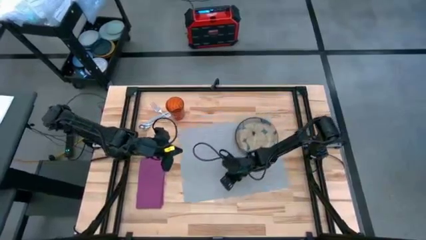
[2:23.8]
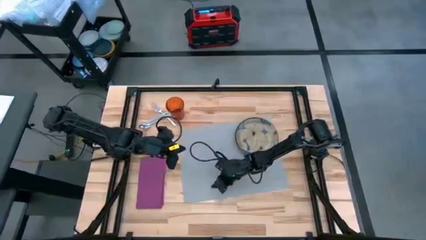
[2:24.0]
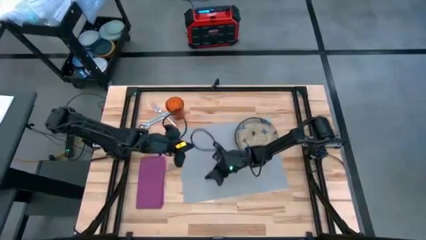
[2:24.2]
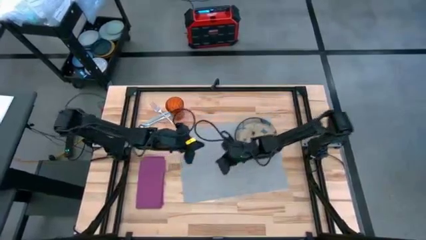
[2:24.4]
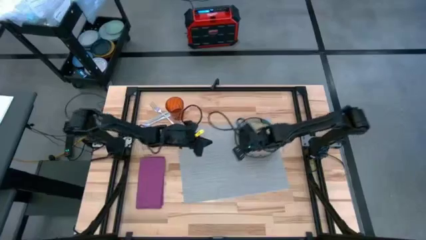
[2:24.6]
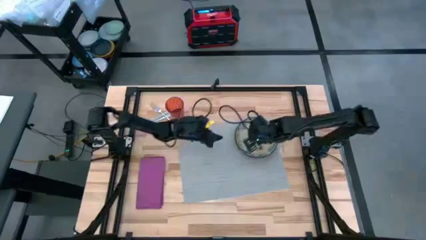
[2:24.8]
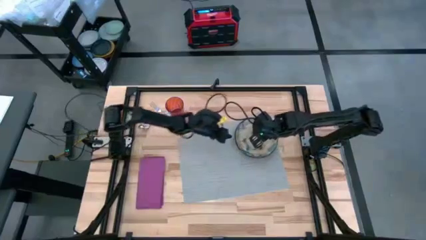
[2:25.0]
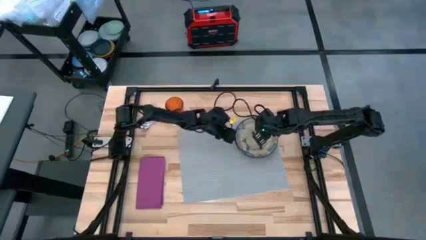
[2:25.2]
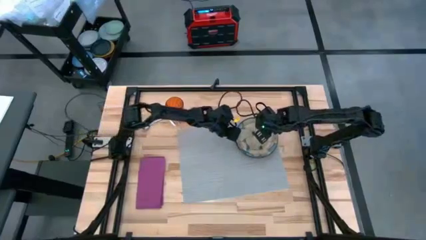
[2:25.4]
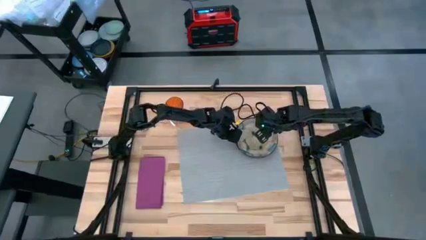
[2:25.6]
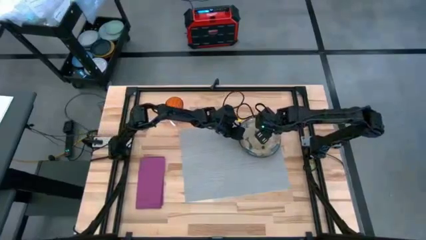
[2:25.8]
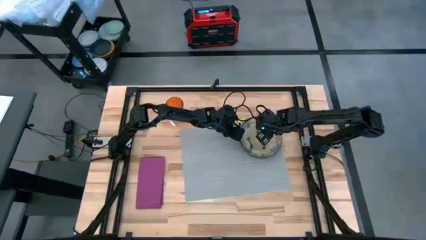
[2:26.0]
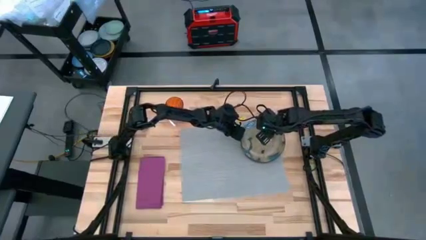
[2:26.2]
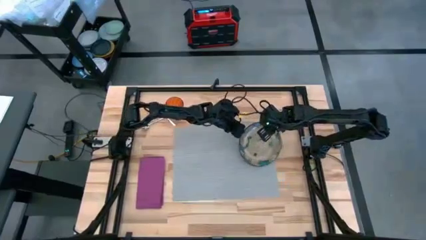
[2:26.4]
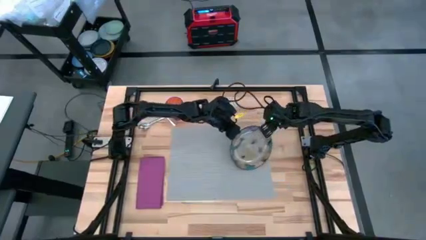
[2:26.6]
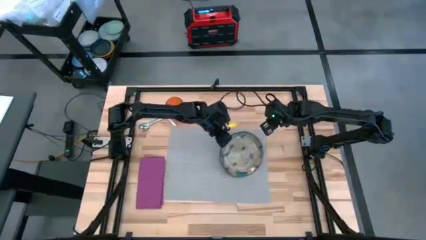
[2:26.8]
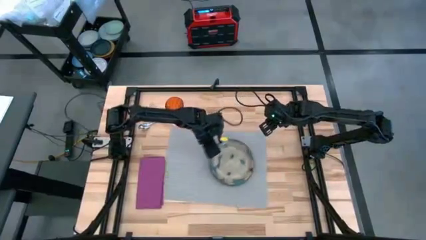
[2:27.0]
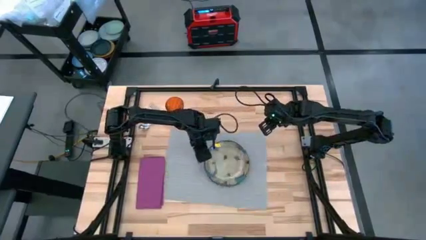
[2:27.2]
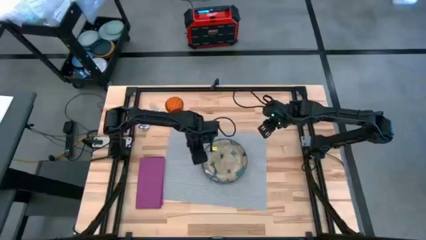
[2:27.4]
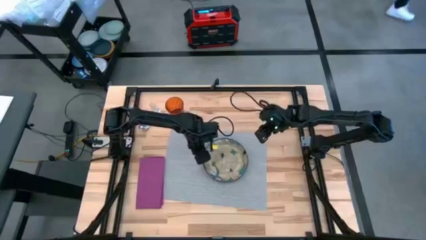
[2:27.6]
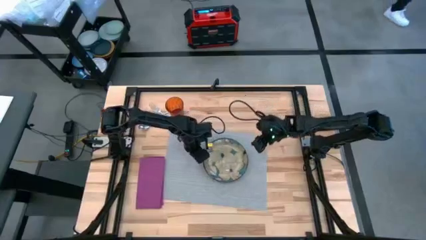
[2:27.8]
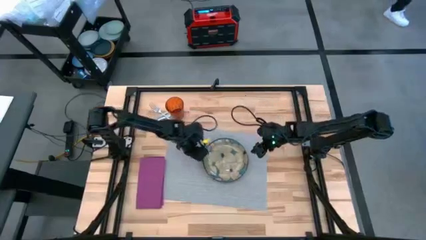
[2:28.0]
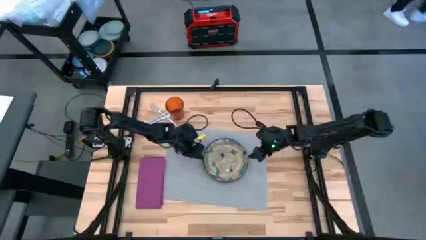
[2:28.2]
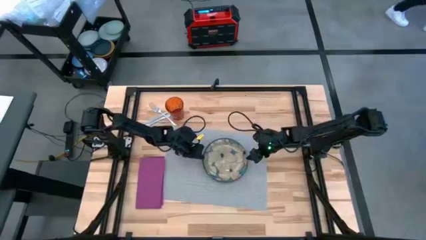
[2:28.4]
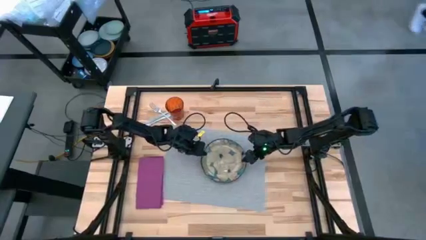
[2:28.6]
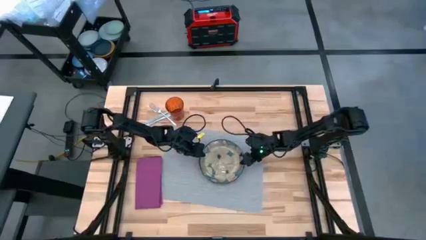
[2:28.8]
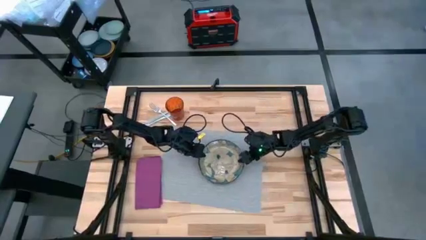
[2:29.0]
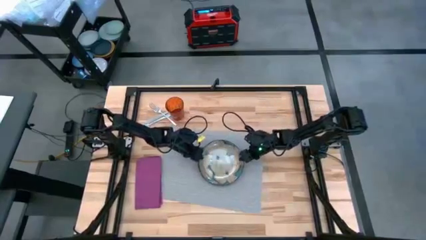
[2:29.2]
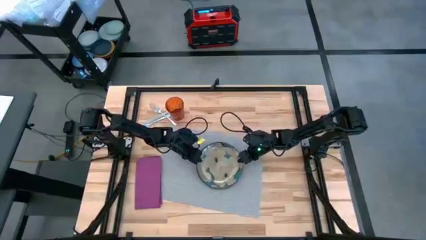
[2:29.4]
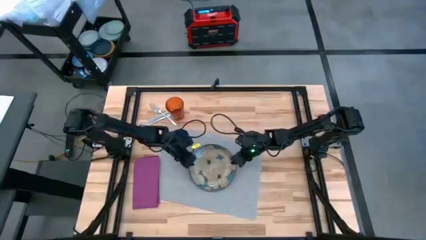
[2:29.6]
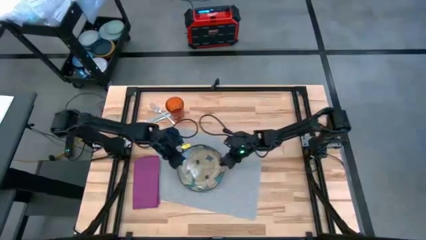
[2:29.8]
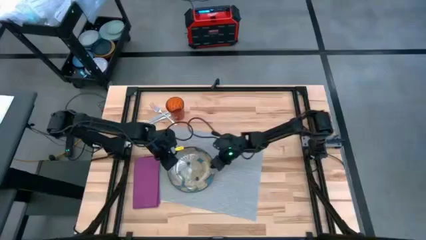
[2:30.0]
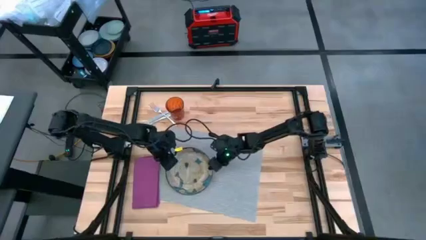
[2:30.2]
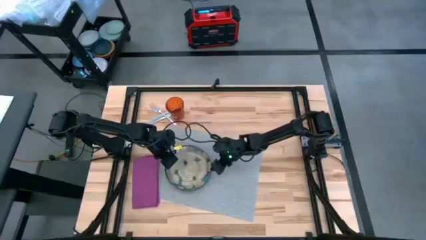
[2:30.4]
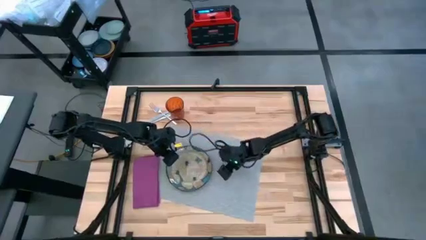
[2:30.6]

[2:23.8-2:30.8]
Task: Set table place
Adjust the white floral patterned plate on the gray placemat

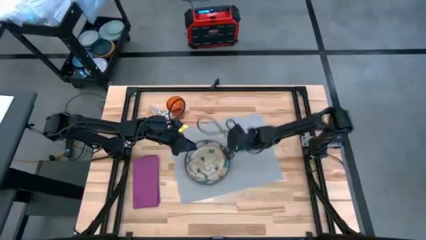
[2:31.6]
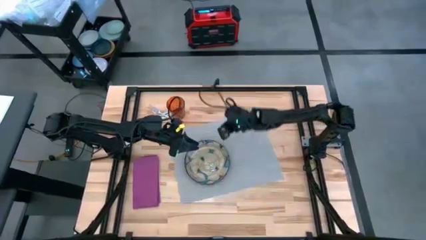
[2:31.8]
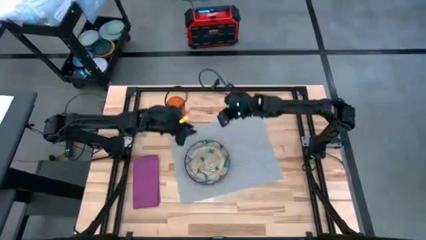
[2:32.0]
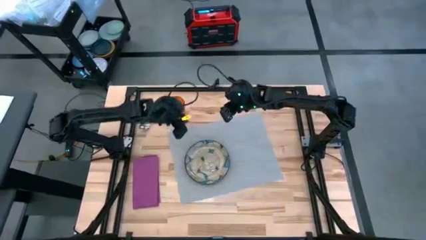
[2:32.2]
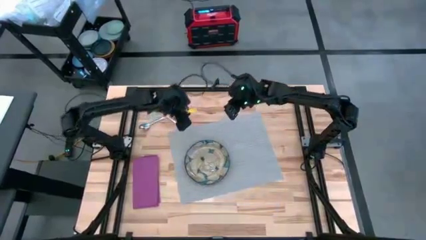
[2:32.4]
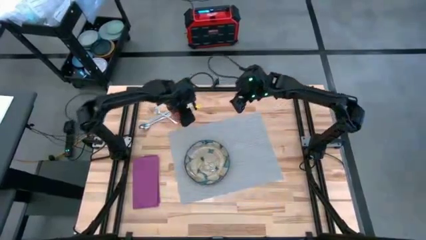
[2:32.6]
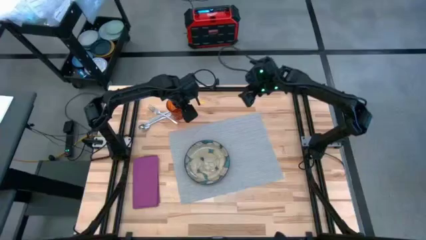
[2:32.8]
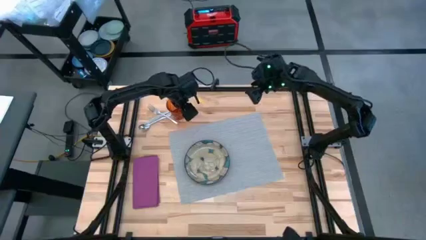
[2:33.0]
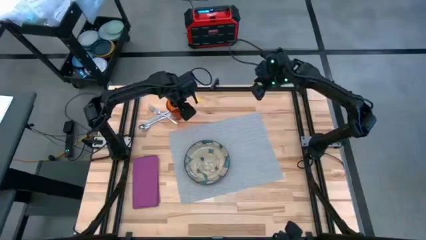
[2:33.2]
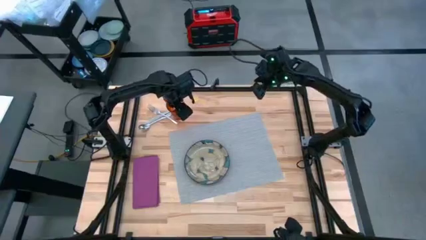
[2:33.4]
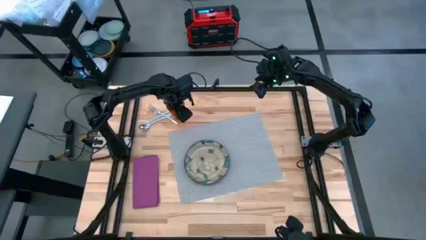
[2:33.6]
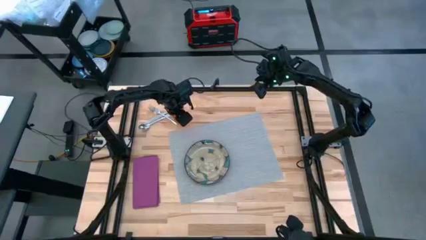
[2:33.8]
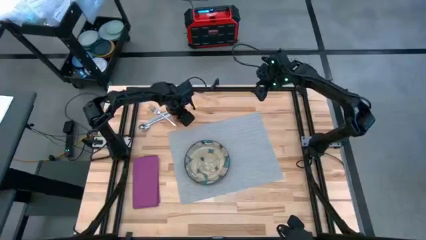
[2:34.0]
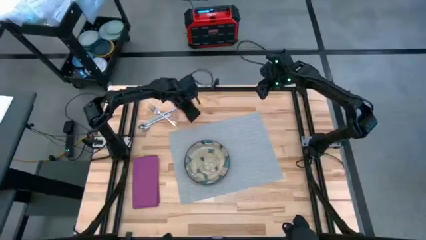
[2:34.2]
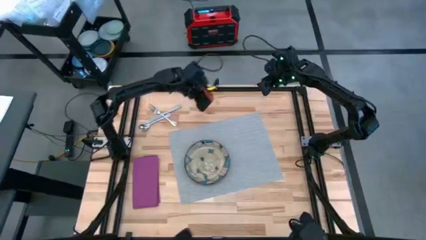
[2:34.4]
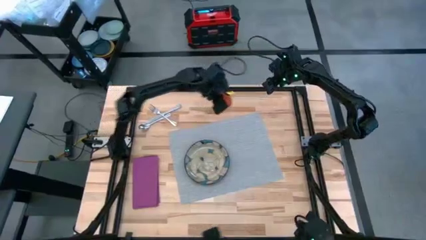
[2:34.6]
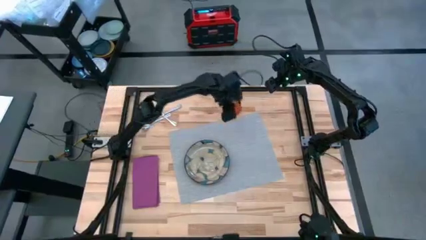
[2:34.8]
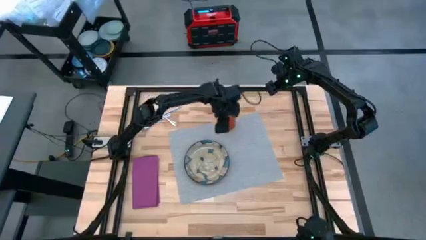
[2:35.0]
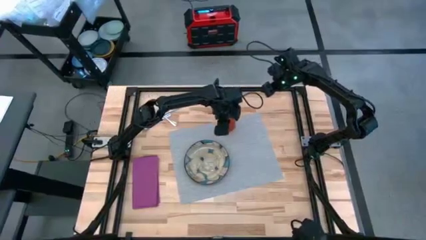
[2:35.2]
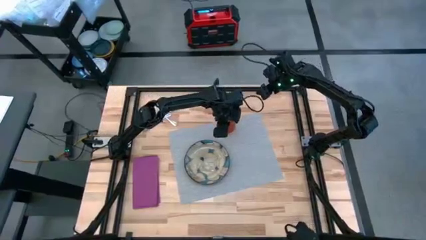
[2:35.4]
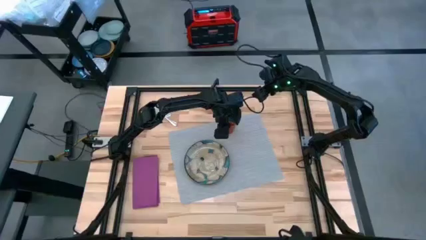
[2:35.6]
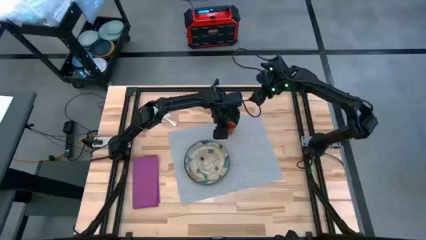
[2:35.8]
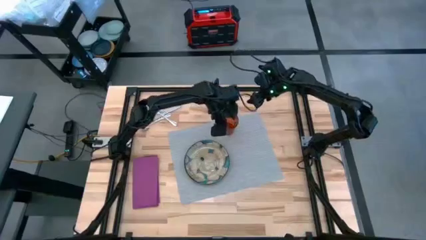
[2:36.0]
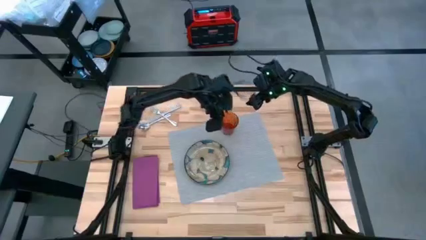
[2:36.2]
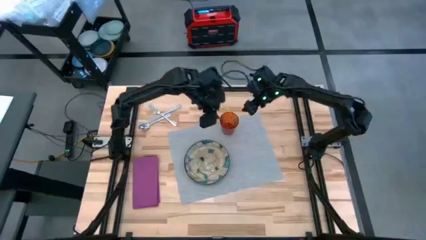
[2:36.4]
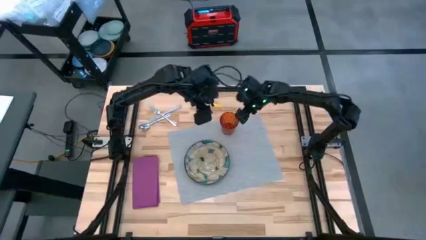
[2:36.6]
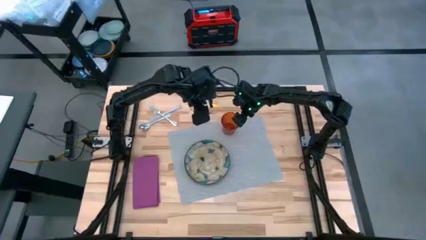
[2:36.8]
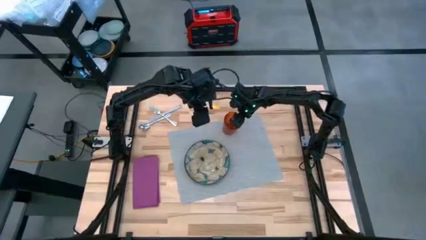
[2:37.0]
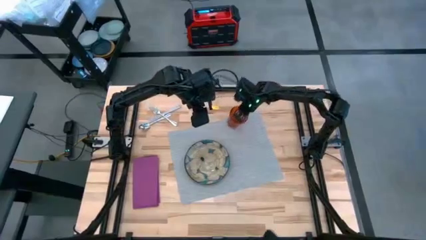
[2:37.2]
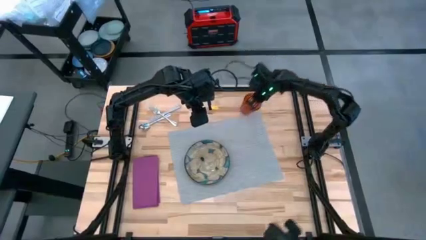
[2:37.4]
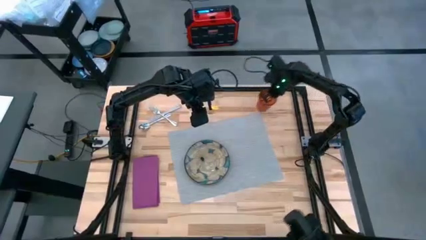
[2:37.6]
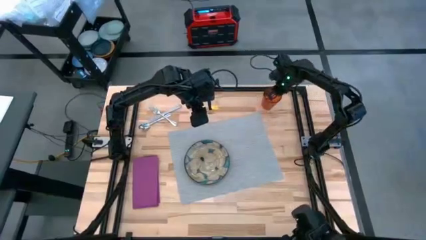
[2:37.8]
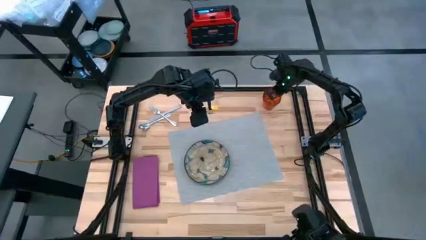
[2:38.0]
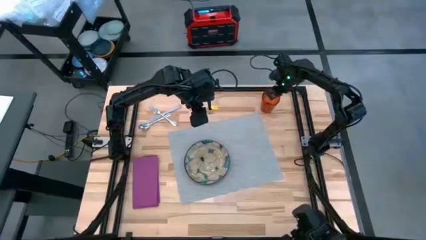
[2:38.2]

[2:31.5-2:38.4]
Put the orange cup on the placemat to the top right of the plate

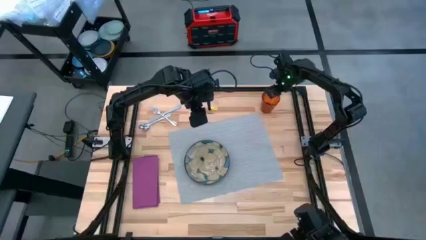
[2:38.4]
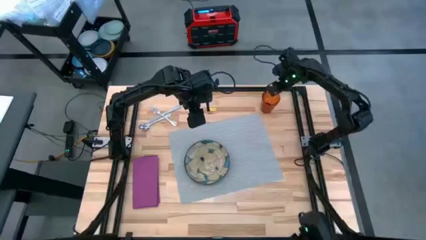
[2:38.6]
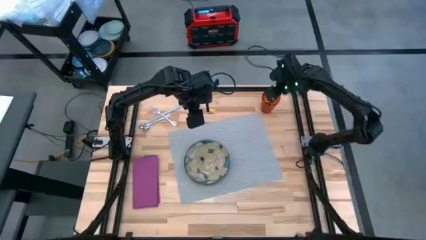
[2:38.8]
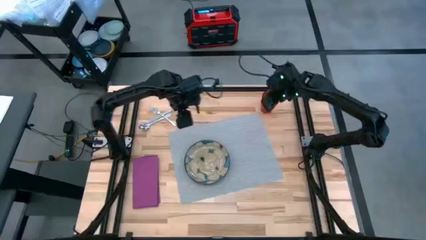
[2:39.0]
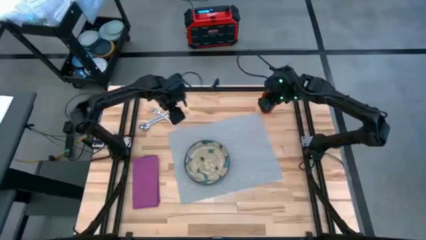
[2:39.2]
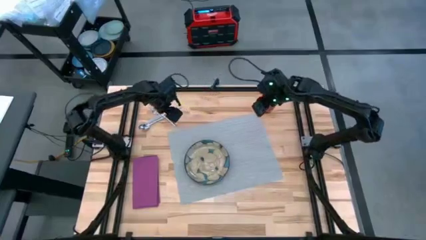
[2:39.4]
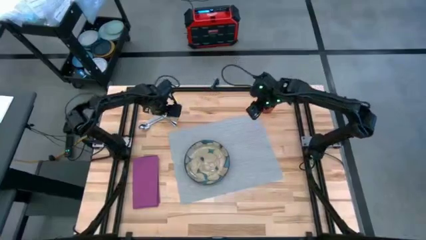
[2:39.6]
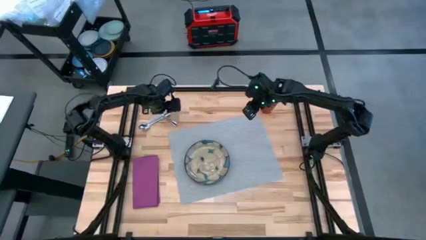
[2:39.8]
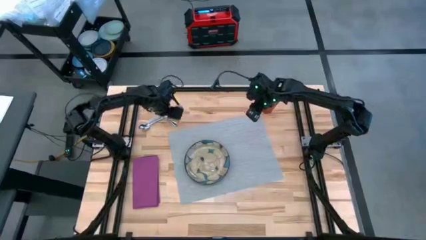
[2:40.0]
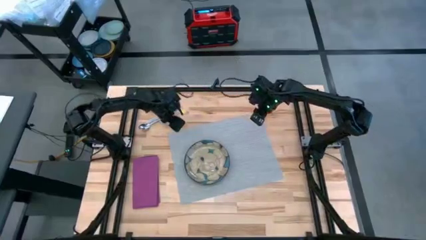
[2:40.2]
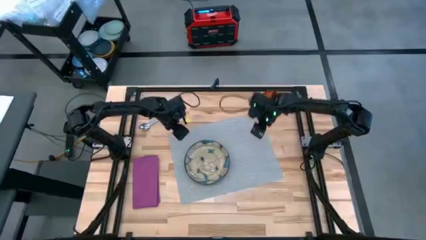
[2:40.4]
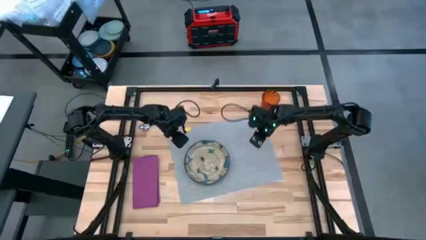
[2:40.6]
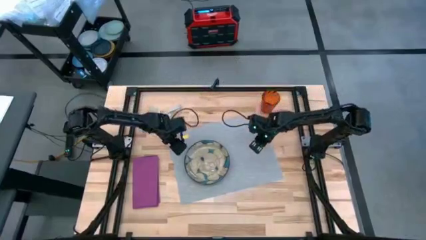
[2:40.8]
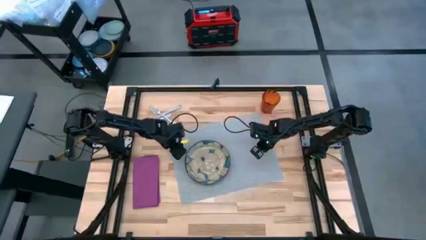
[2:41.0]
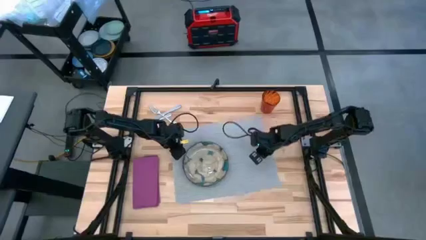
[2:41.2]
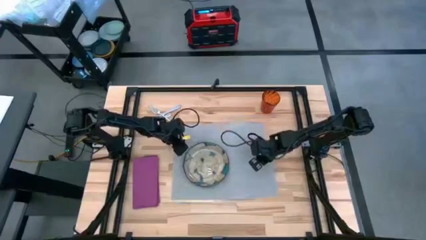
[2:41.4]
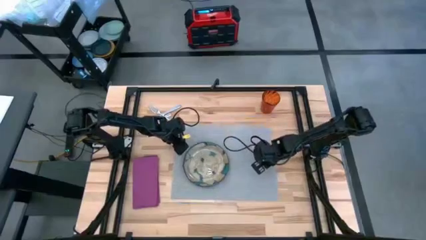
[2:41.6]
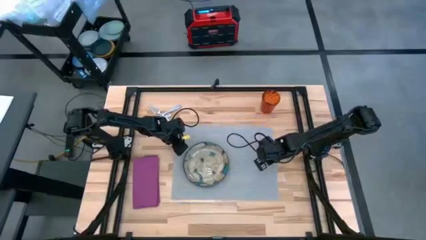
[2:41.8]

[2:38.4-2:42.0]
Adjust the placemat
